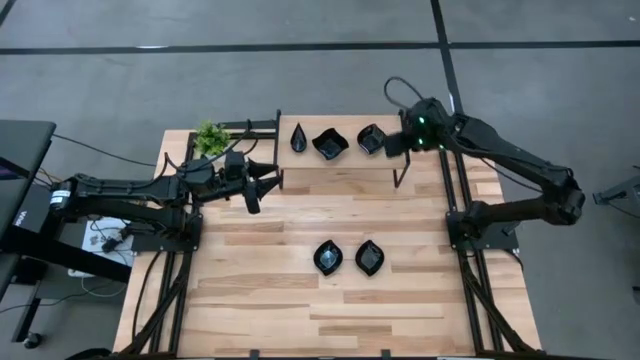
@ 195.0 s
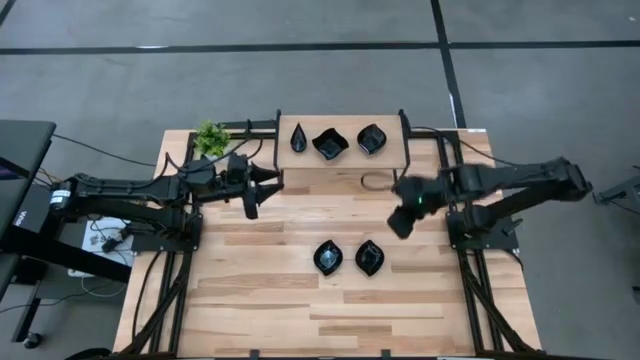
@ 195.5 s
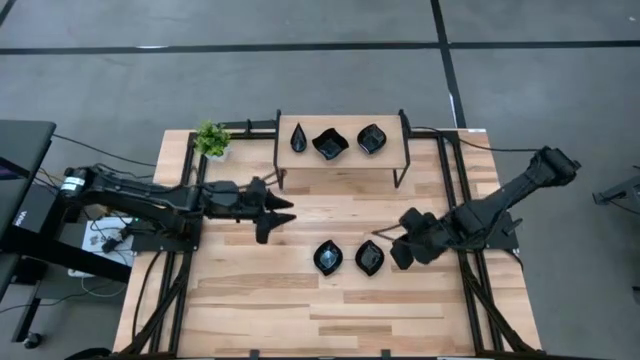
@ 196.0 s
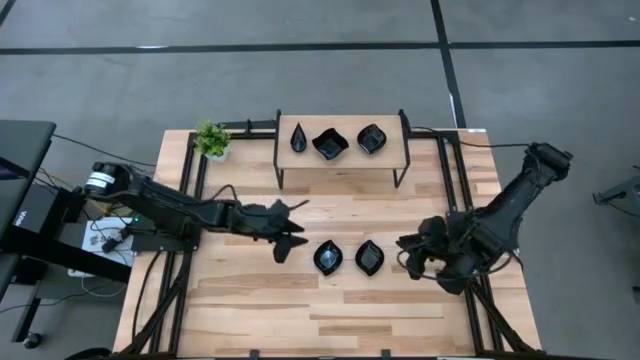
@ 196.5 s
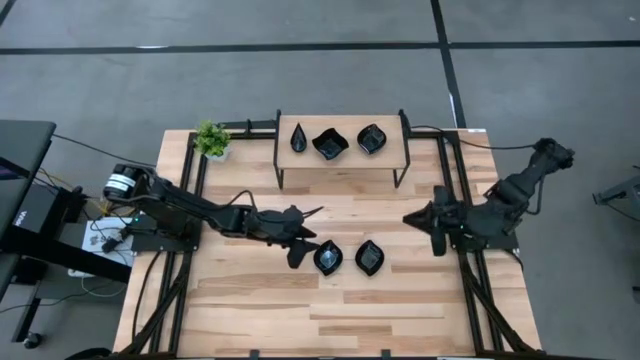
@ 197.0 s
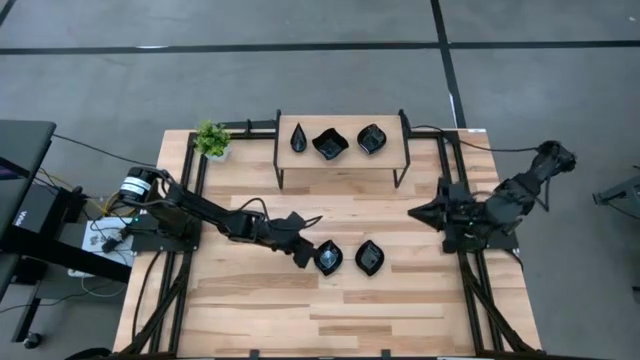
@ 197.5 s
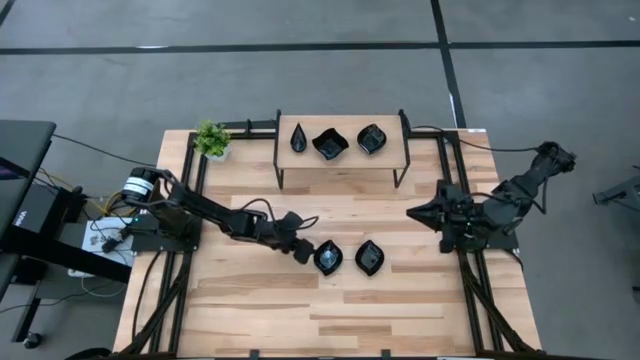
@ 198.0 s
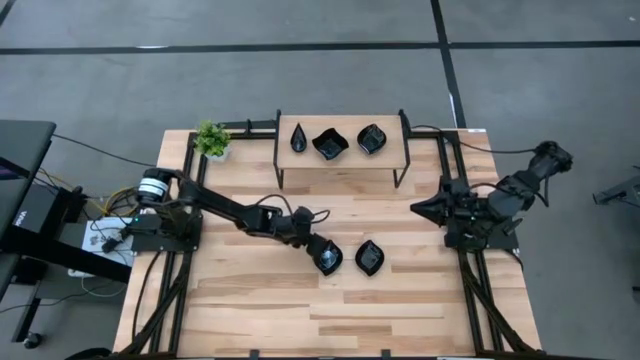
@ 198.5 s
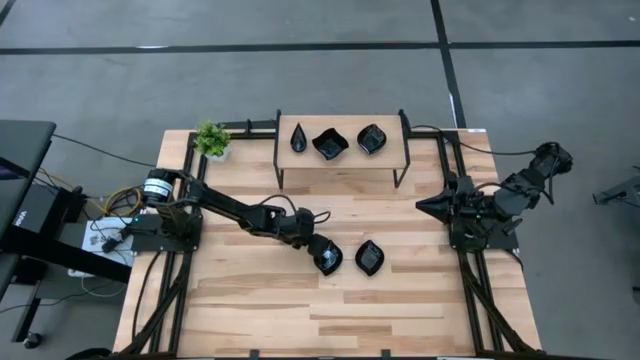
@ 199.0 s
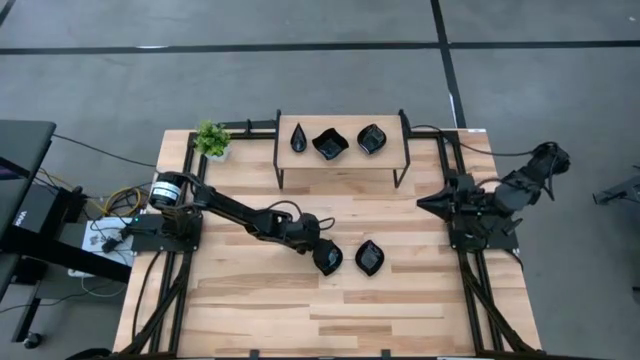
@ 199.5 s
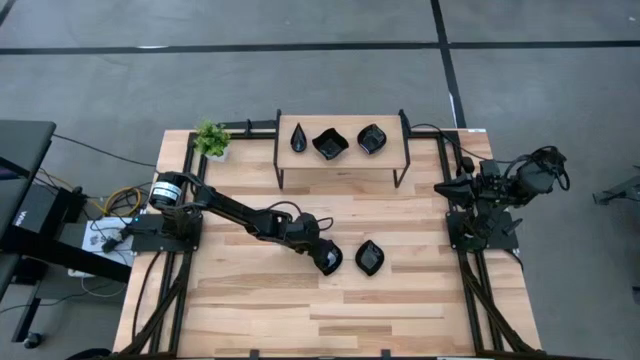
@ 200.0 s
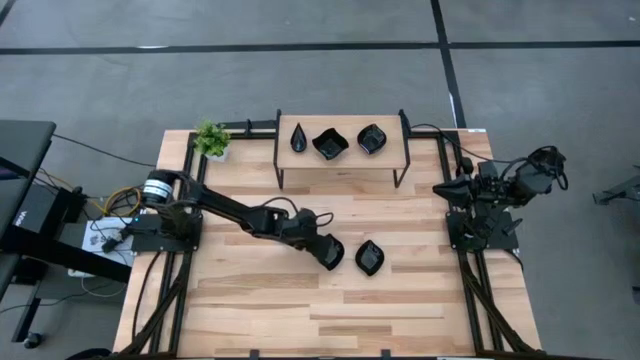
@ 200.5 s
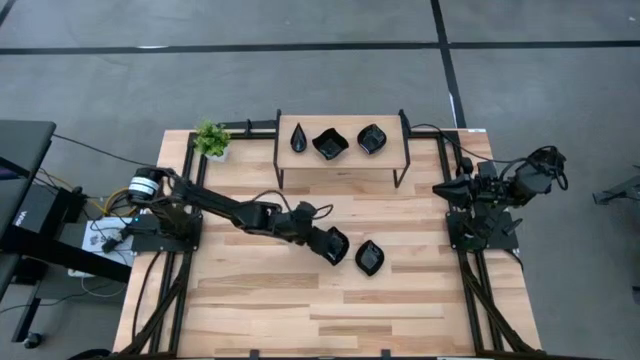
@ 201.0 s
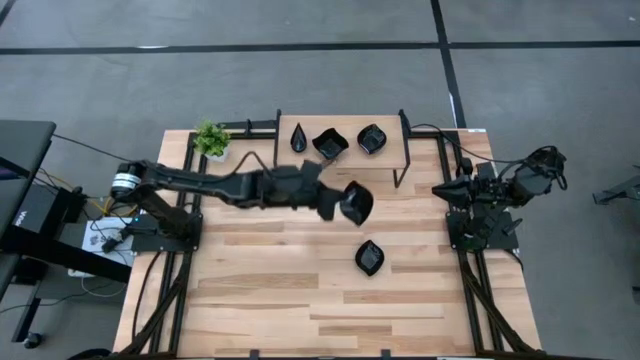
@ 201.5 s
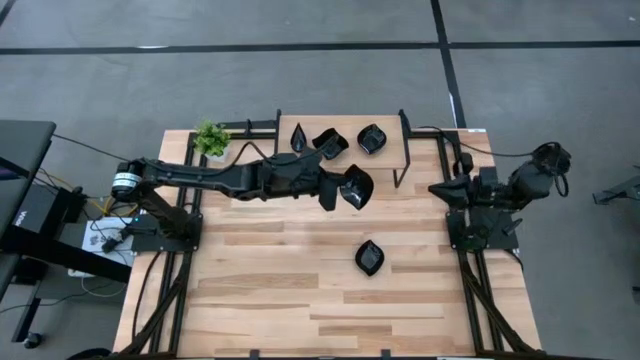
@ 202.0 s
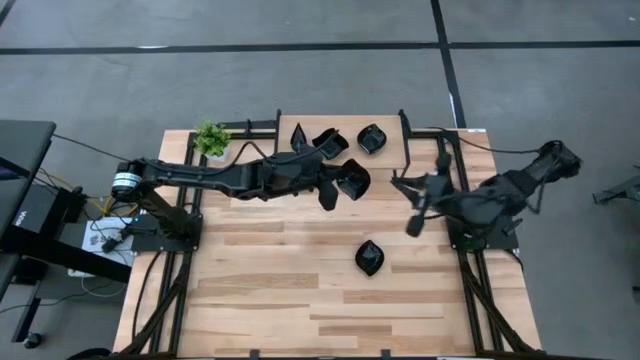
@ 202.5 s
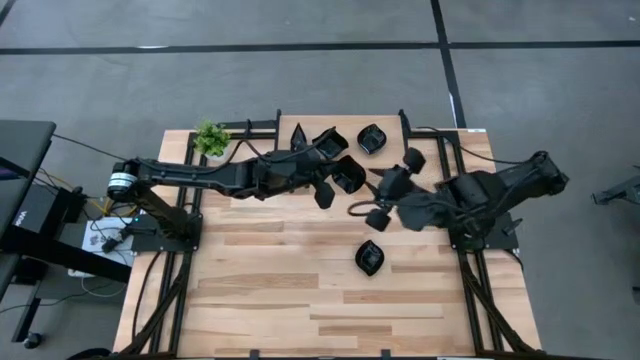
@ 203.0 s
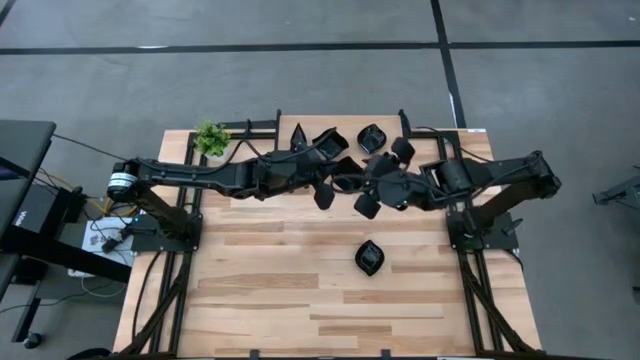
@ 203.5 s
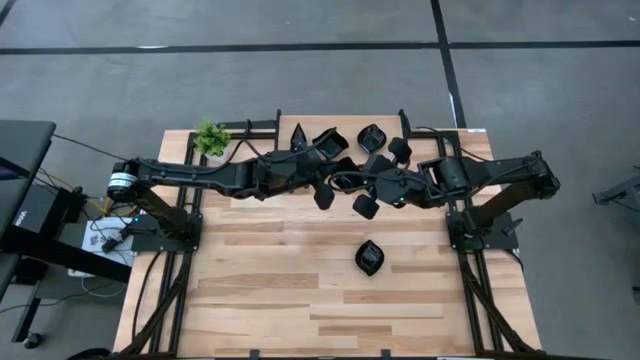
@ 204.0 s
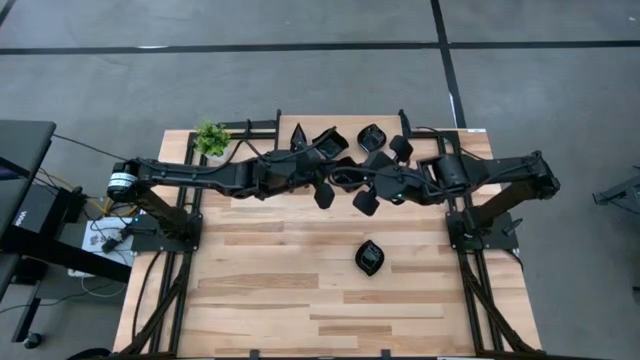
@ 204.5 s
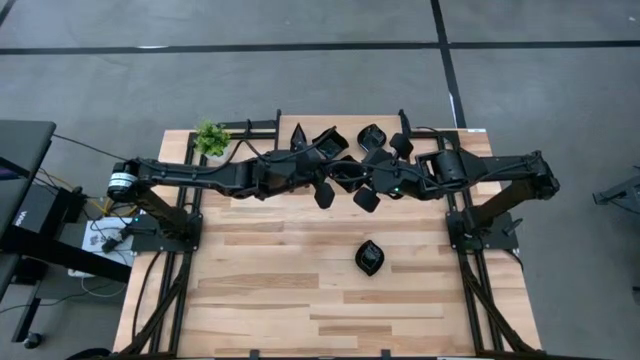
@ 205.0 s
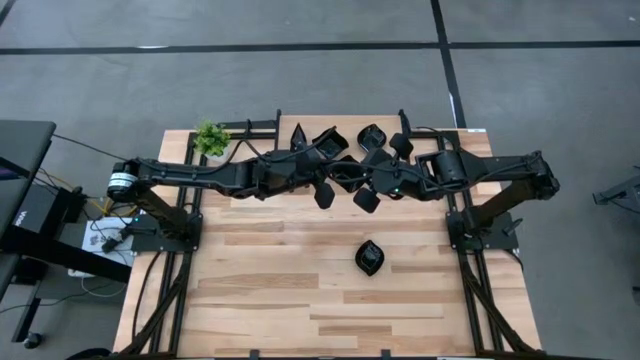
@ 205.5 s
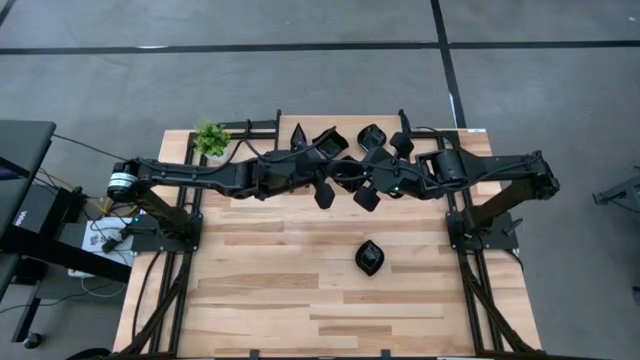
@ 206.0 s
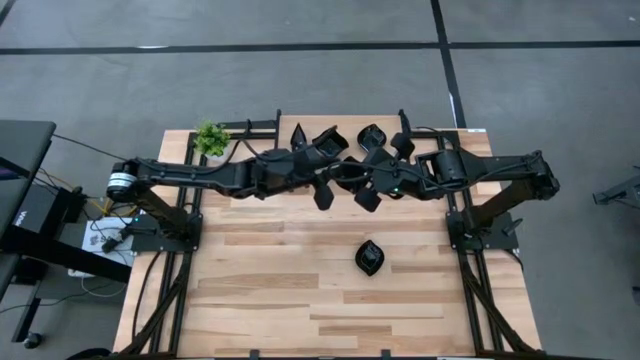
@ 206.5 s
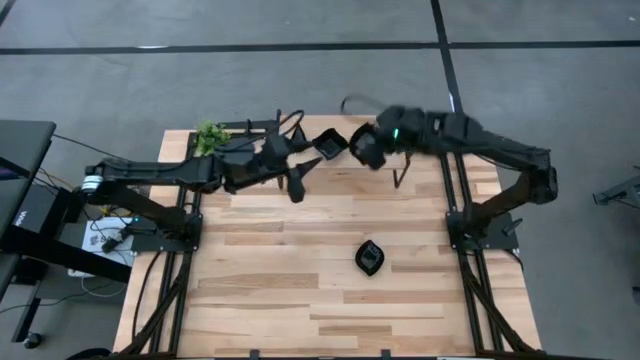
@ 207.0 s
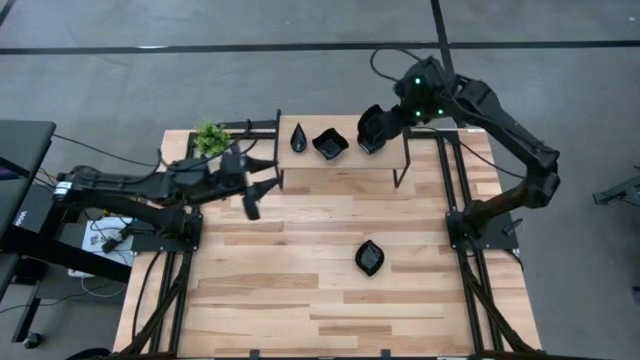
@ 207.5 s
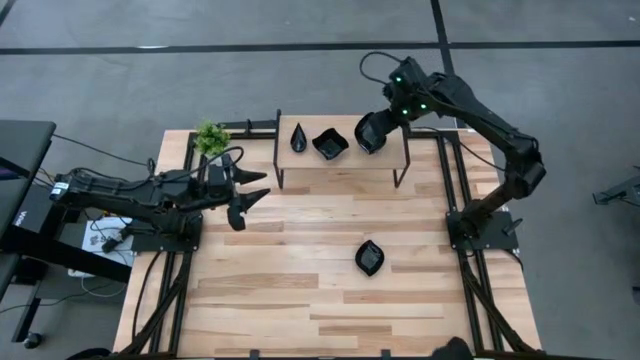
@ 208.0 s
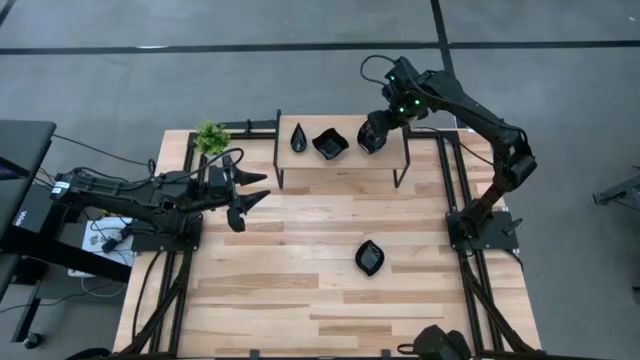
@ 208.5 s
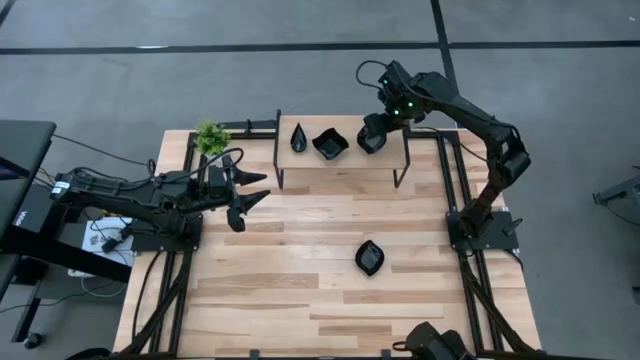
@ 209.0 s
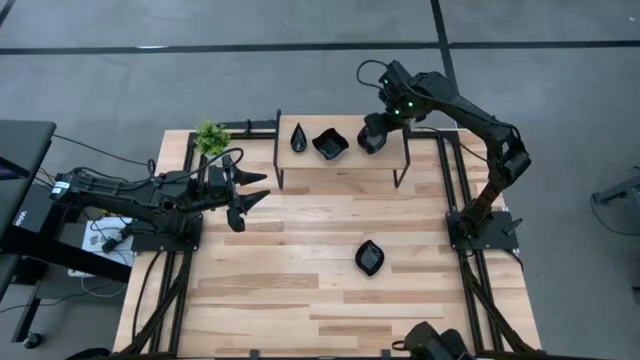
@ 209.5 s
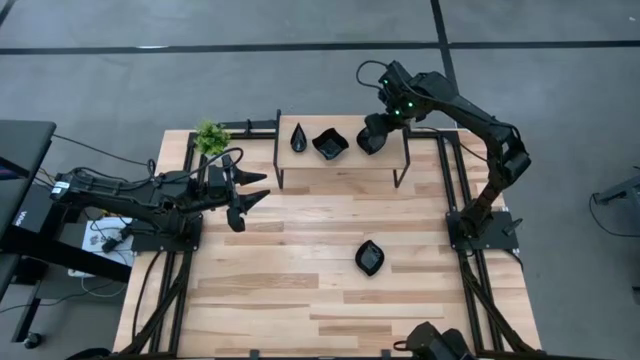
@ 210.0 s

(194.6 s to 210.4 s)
Task: Pick & Place Mini shaped plates
Stack the black leaf shaped plate on top of the black leaf shaped plates on the shelf

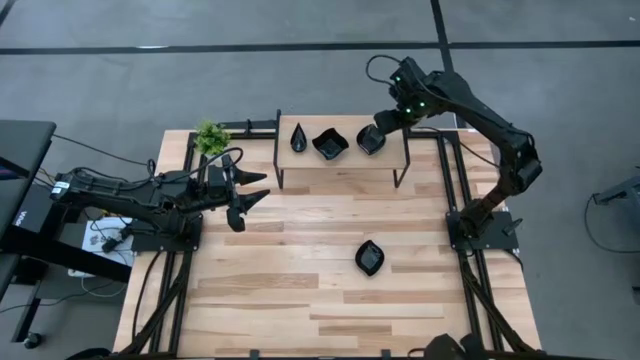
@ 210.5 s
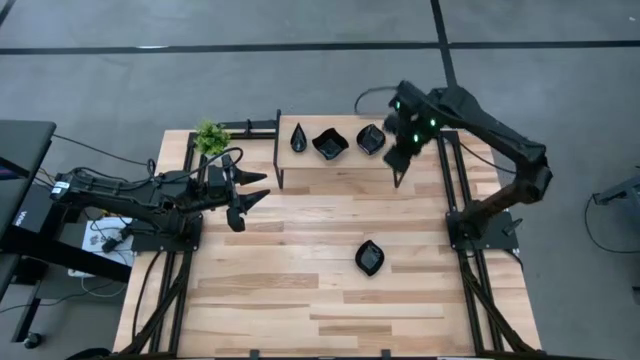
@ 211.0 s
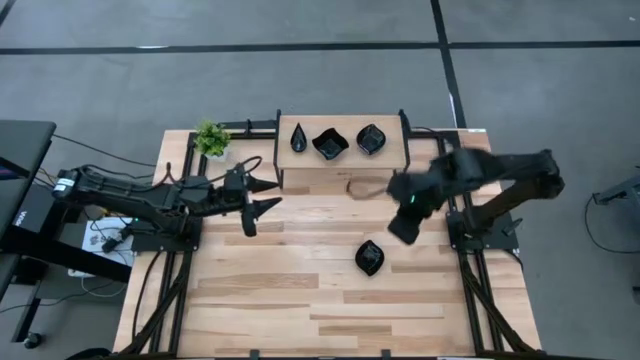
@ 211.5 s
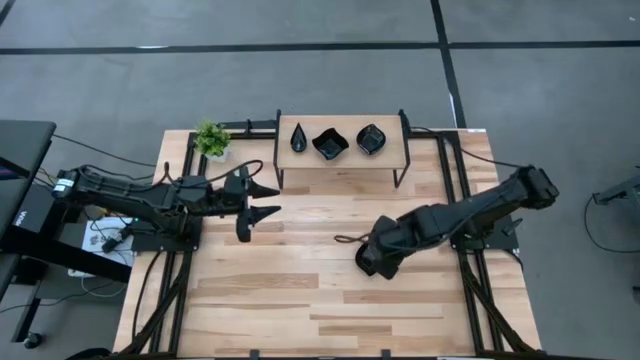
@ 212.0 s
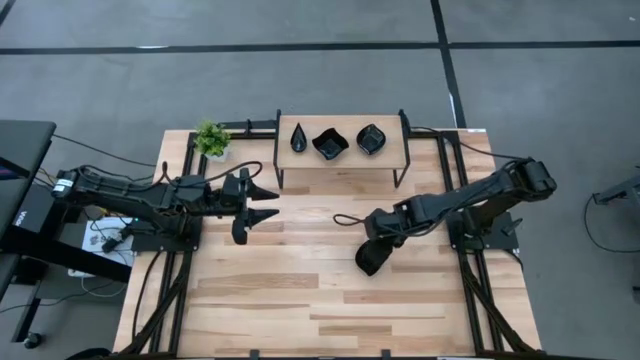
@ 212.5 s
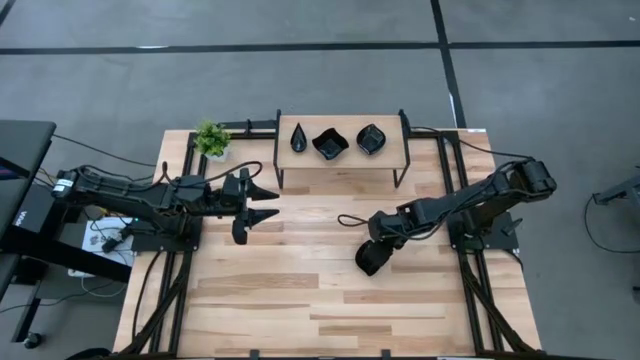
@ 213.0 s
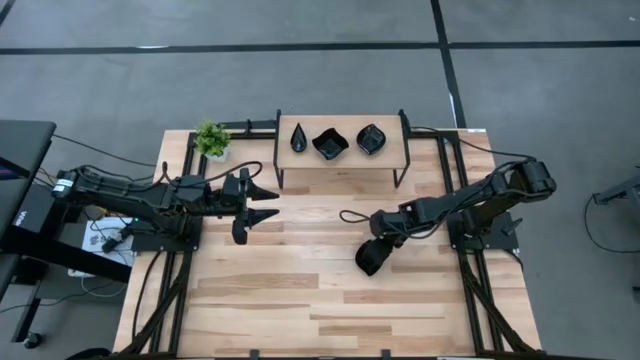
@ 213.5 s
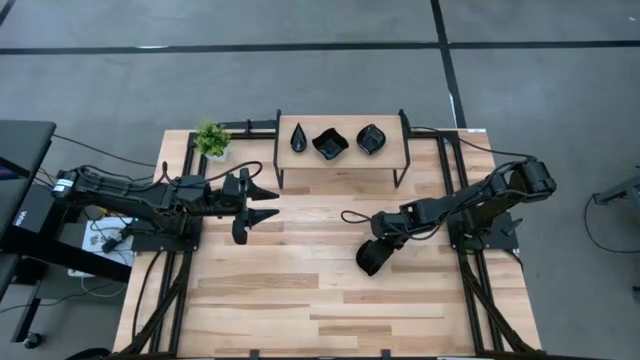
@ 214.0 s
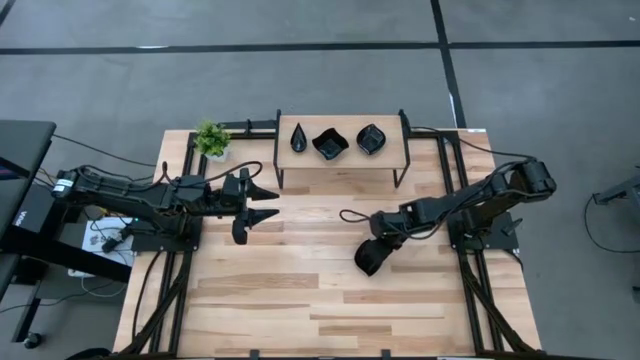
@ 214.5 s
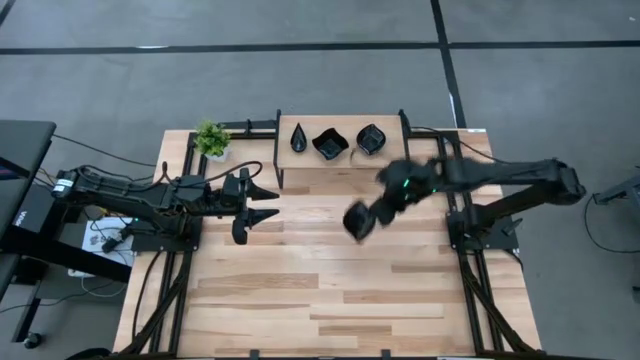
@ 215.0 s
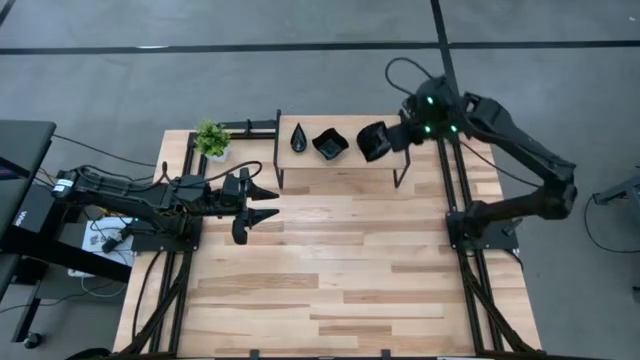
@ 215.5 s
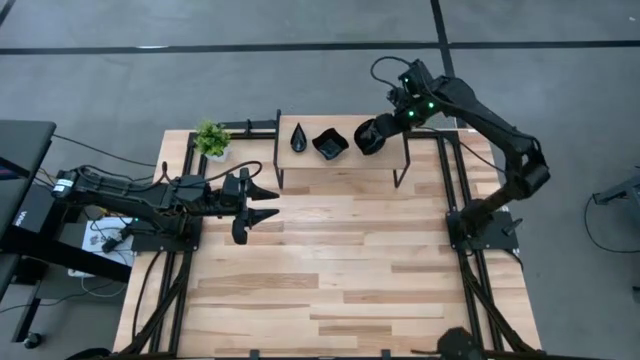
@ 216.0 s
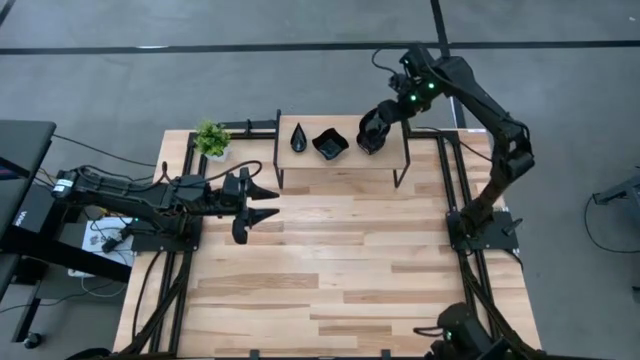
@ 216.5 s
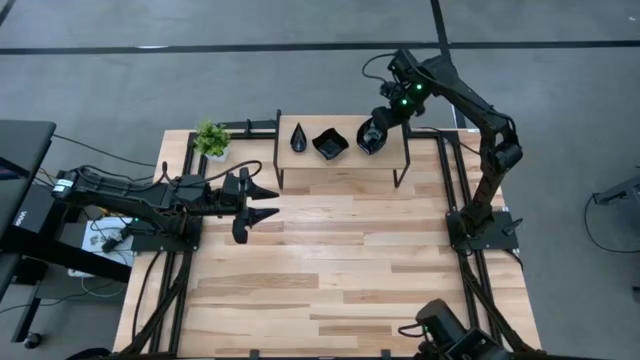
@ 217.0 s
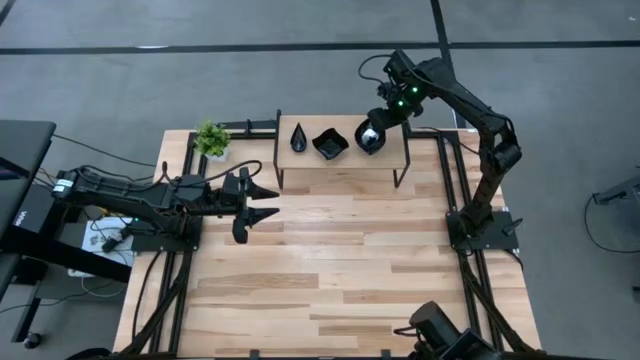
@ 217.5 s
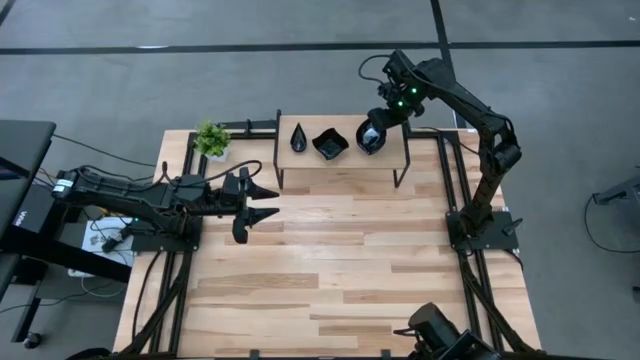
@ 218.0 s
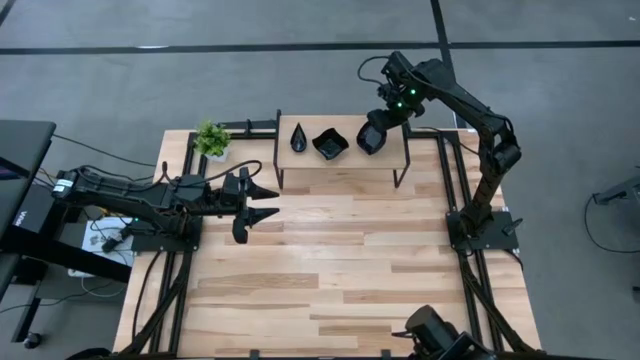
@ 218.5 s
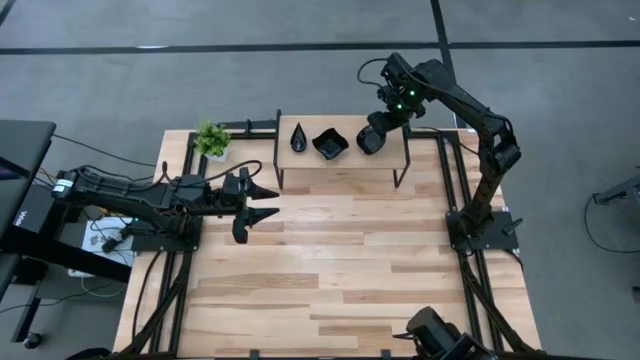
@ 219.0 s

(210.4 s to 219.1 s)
Stack the black leaf shaped plate on top of the black leaf shaped plates on the shelf
